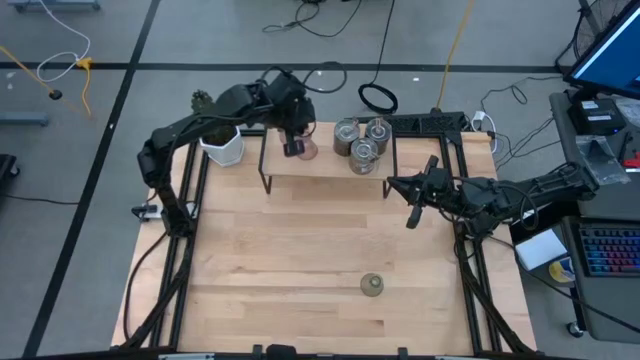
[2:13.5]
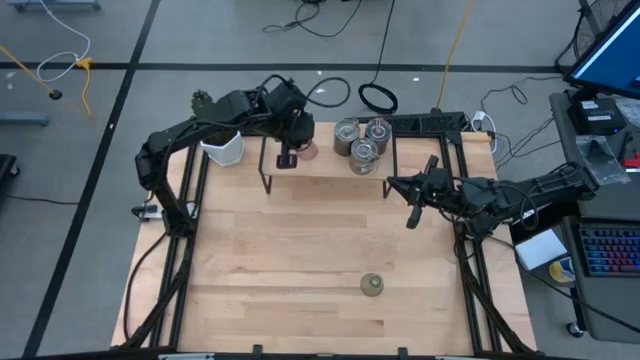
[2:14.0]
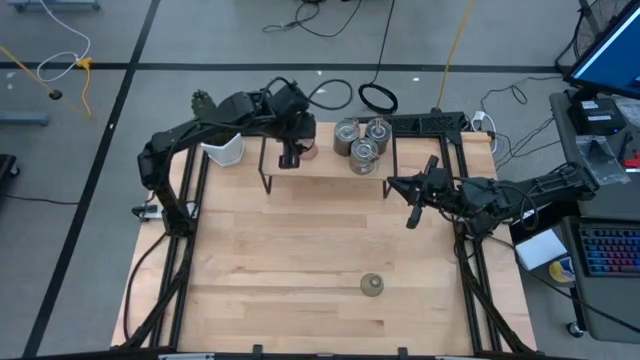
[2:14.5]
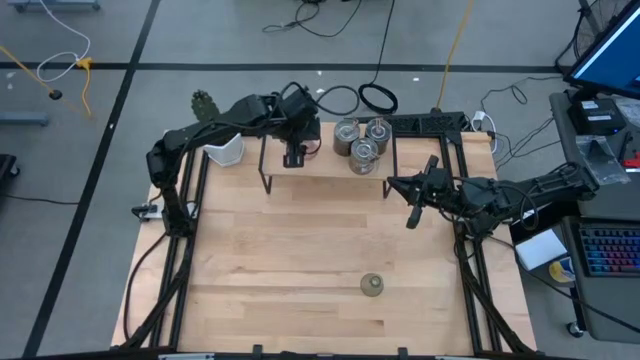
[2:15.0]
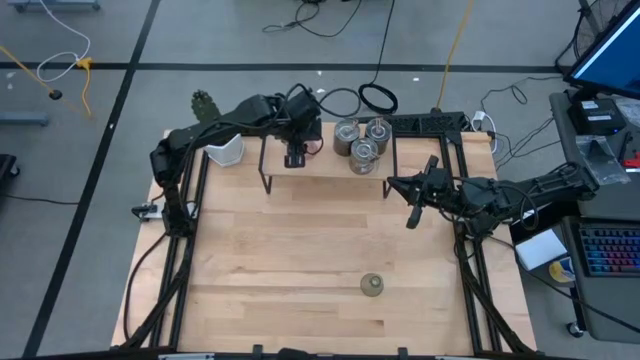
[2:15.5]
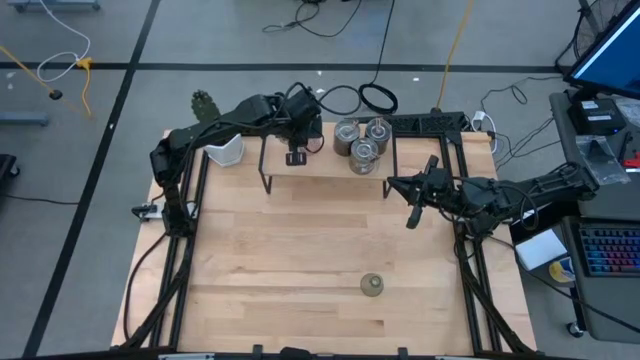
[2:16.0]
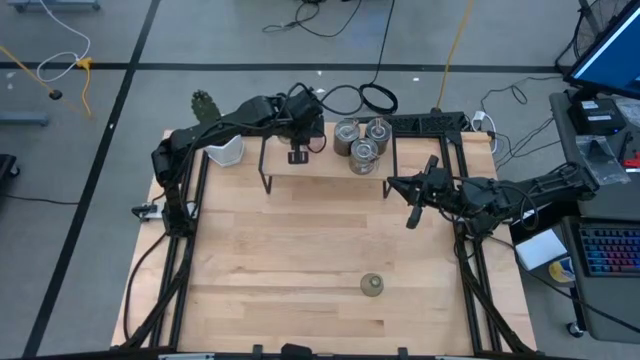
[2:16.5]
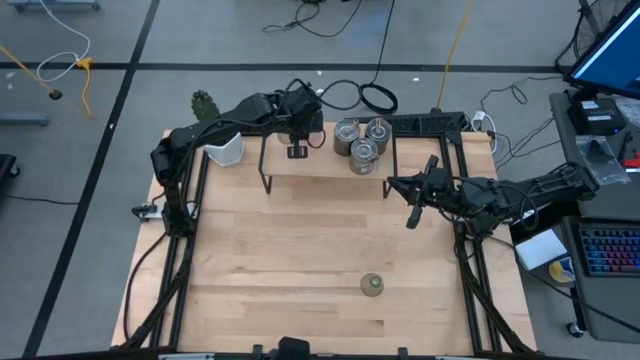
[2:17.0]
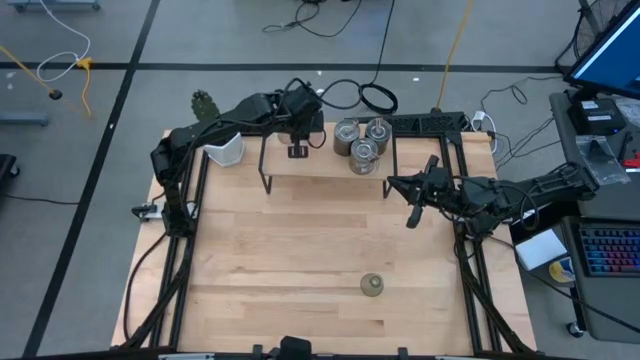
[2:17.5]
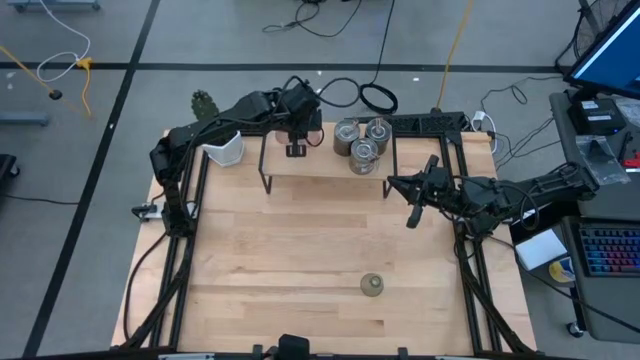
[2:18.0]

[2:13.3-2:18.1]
Task: Pick & Place candle stick holders
Put the purple glass candle holder on the shelf

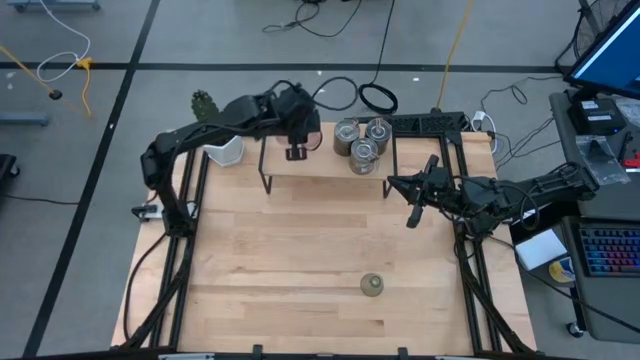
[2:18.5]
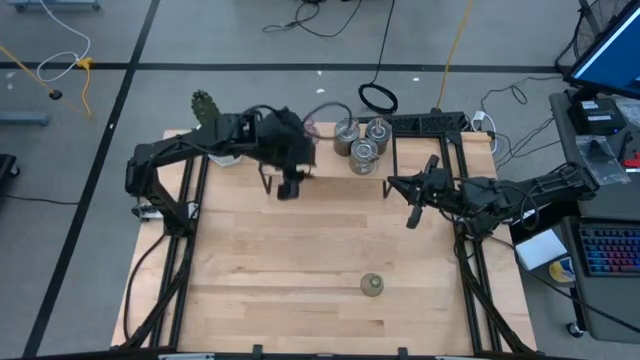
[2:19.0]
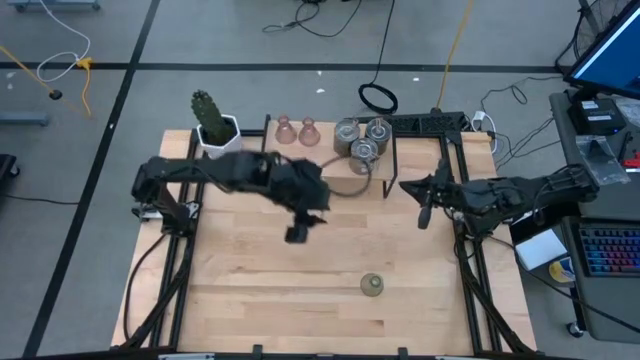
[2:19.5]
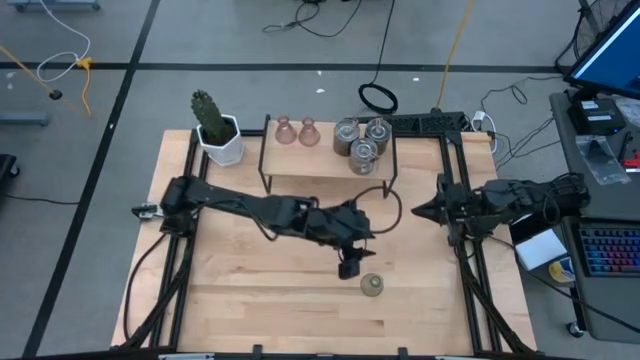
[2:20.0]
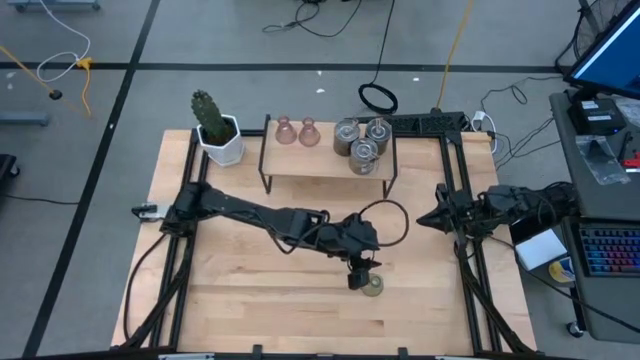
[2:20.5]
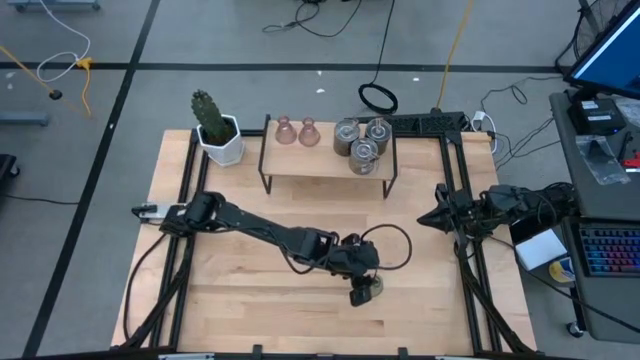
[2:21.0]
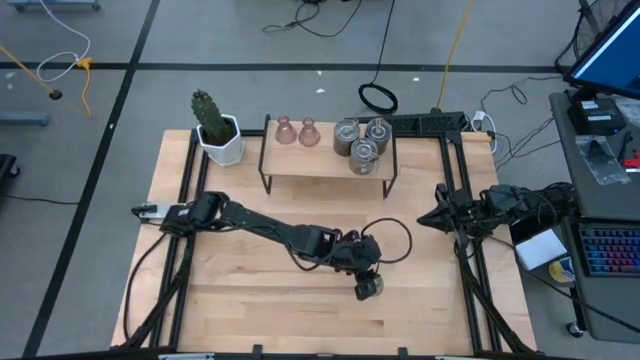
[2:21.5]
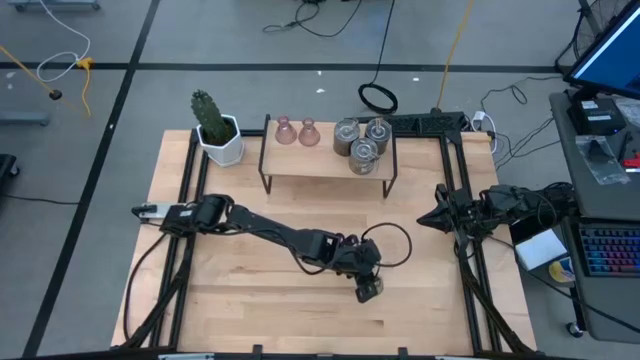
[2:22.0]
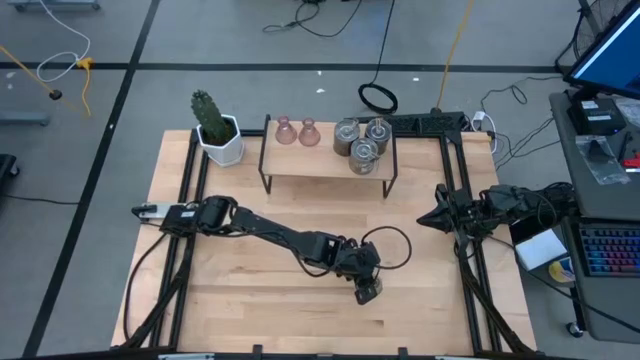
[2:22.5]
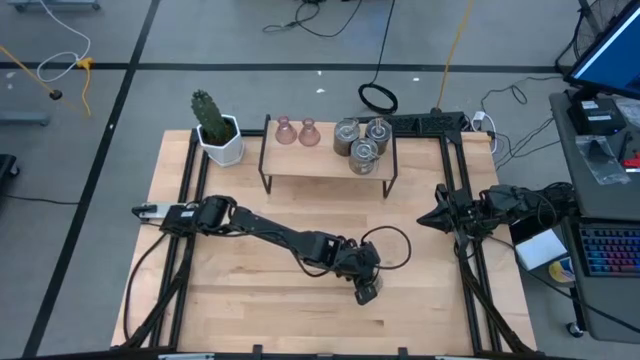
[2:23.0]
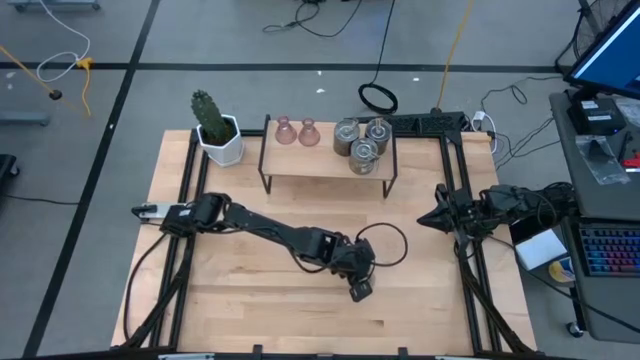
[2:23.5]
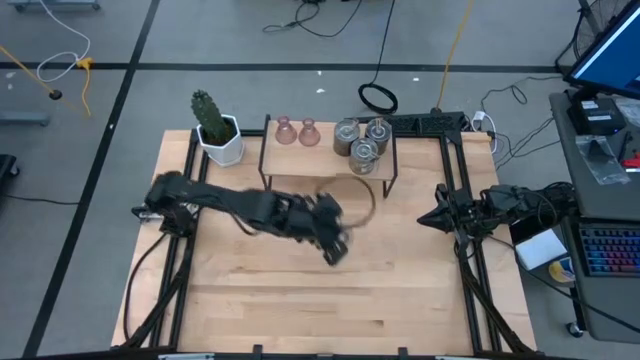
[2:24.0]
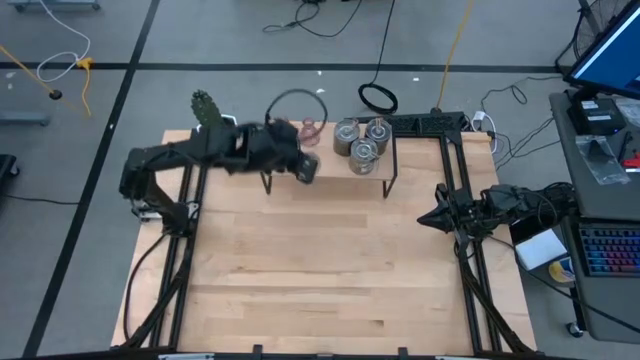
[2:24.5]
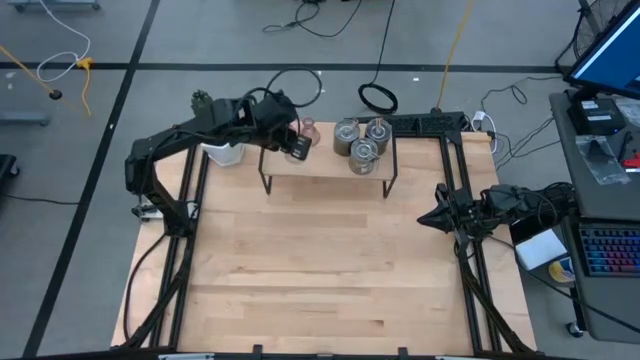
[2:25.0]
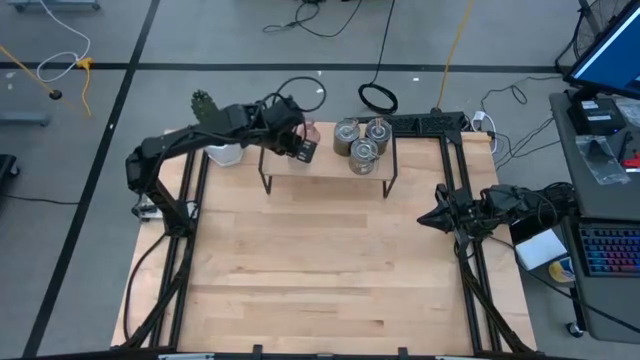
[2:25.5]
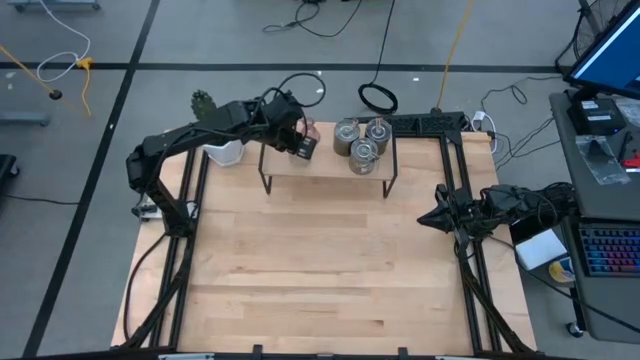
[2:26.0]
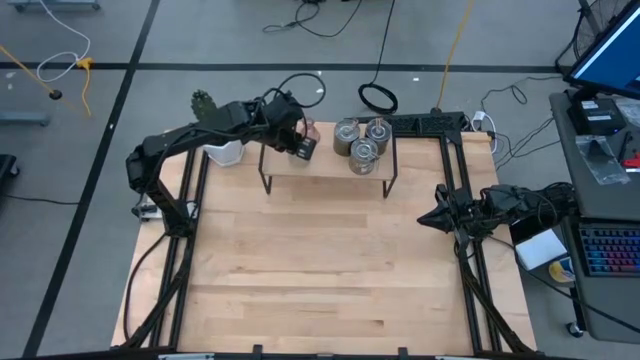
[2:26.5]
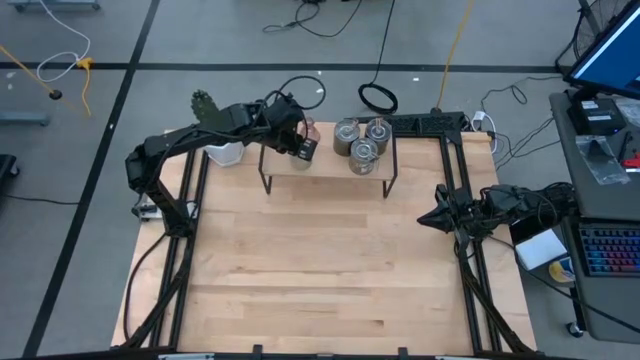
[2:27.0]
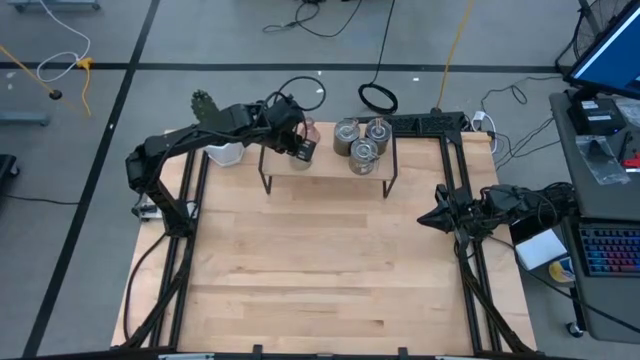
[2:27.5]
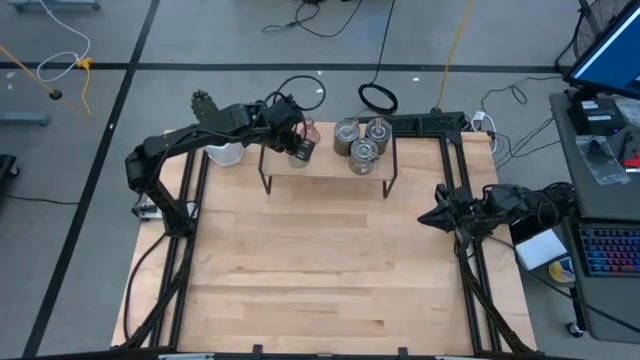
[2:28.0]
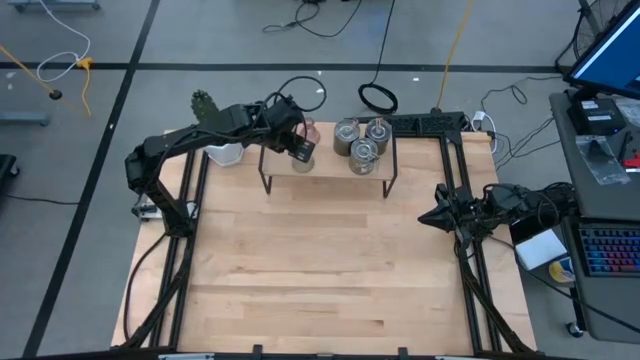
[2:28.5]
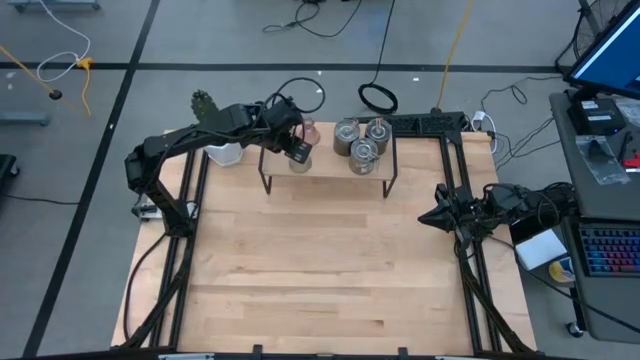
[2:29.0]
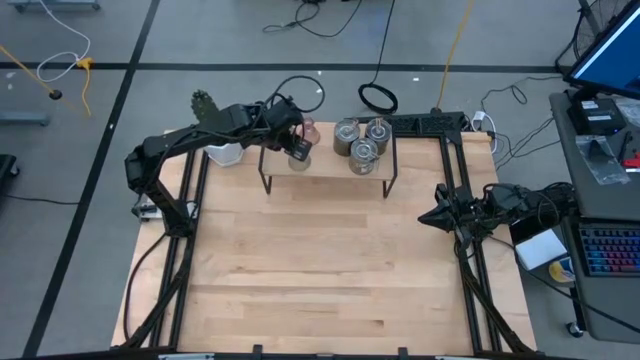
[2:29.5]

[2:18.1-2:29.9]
Put the green glass candle holder on the shelf

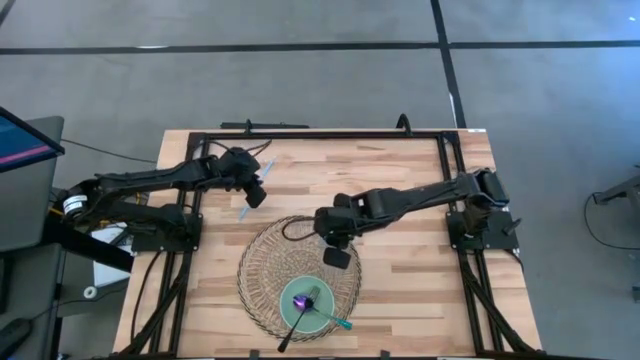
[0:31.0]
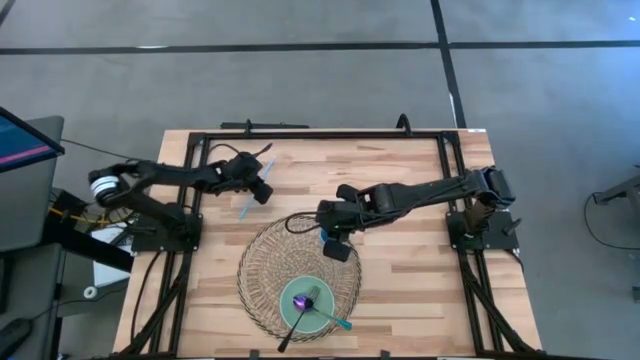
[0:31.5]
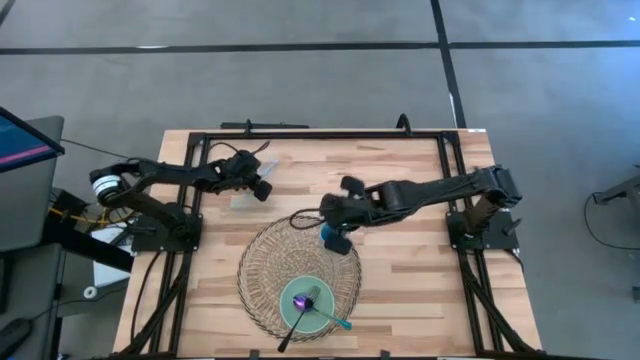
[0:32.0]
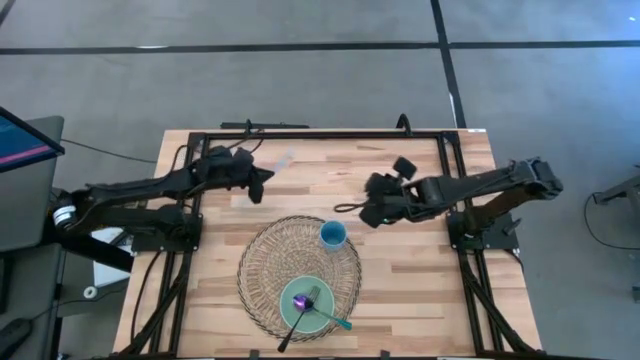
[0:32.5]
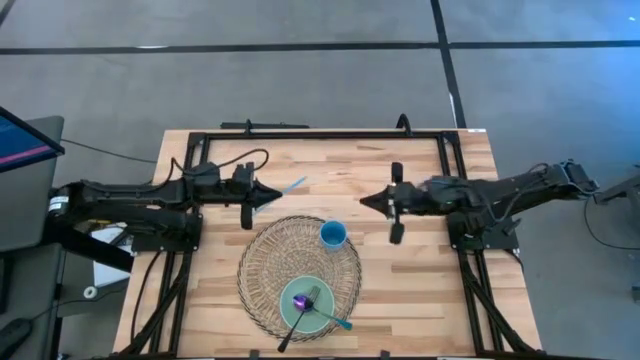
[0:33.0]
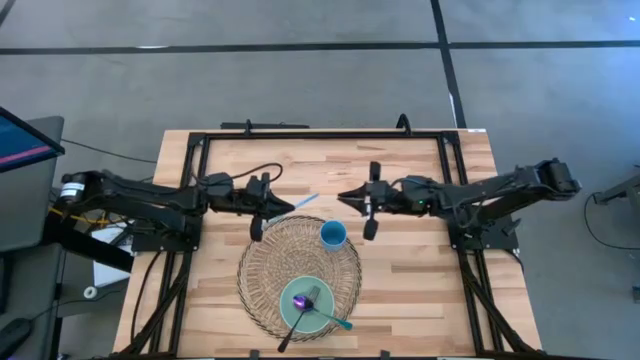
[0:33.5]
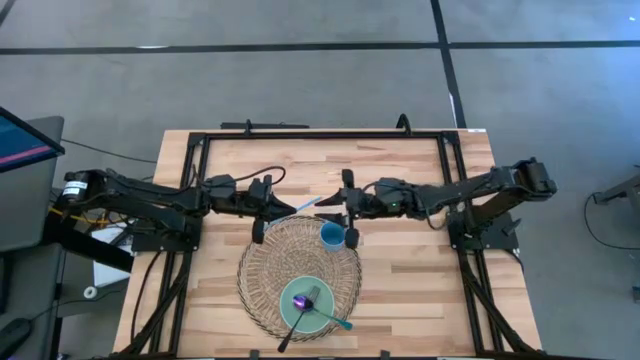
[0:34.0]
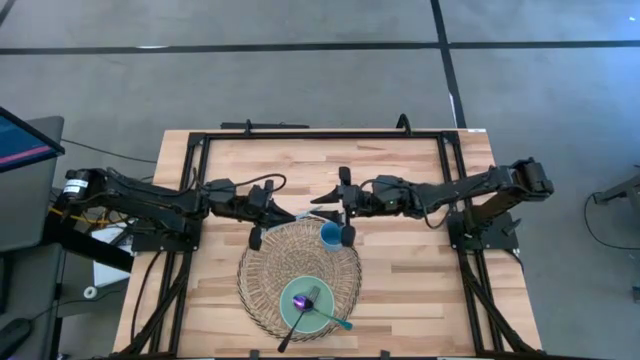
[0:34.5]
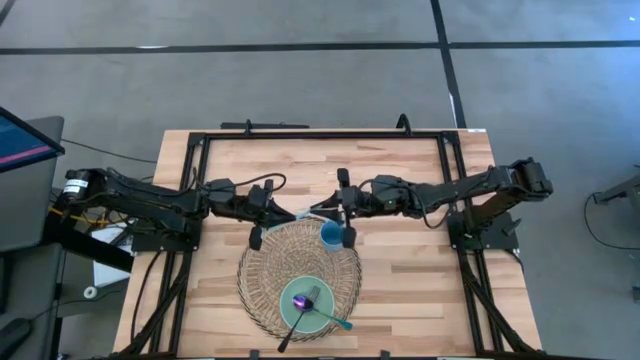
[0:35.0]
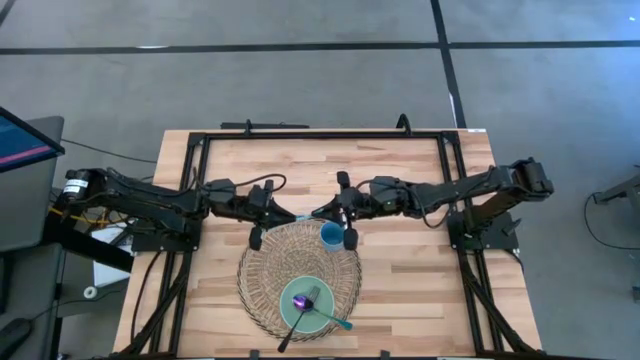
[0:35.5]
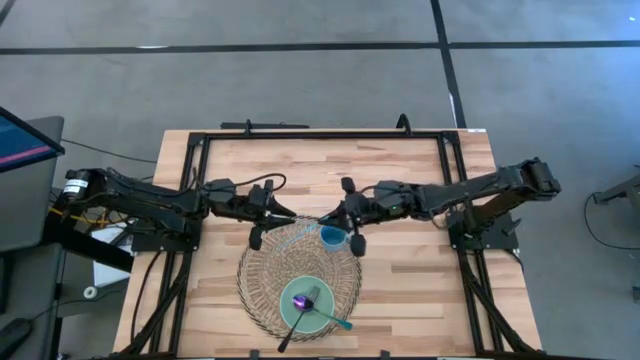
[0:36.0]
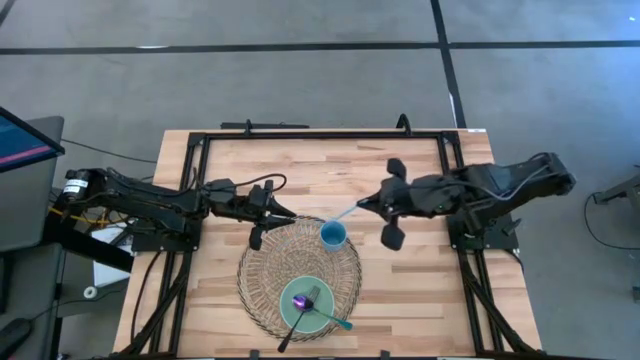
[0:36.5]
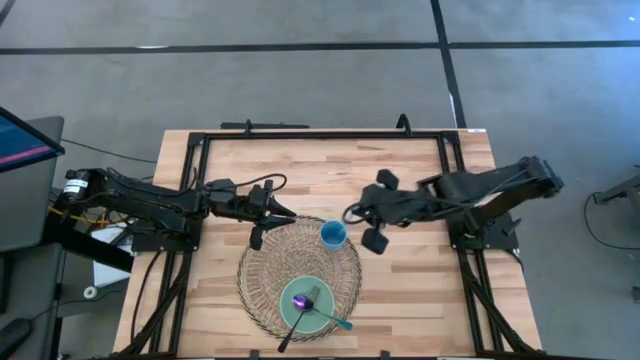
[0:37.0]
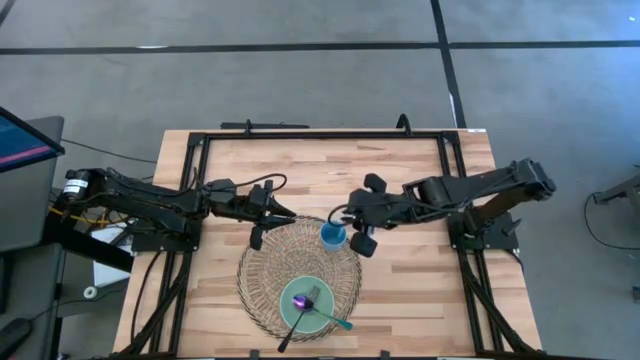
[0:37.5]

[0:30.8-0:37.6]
Task: Pick & Place Utensil
Put the blue straw into the blue cup
